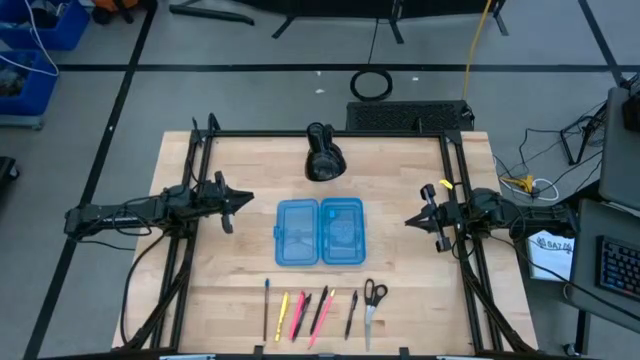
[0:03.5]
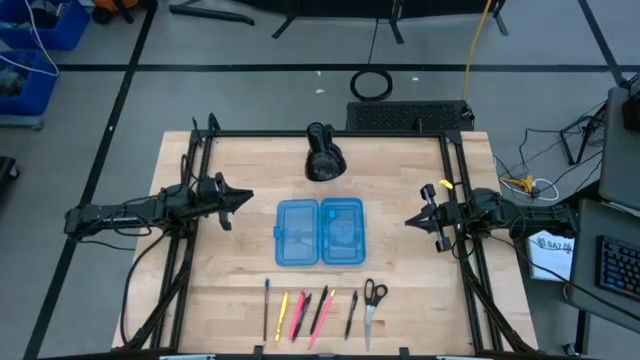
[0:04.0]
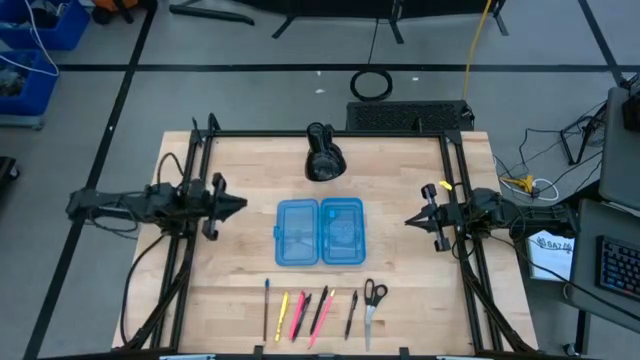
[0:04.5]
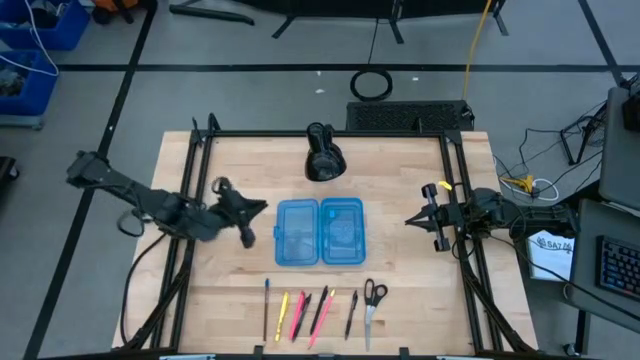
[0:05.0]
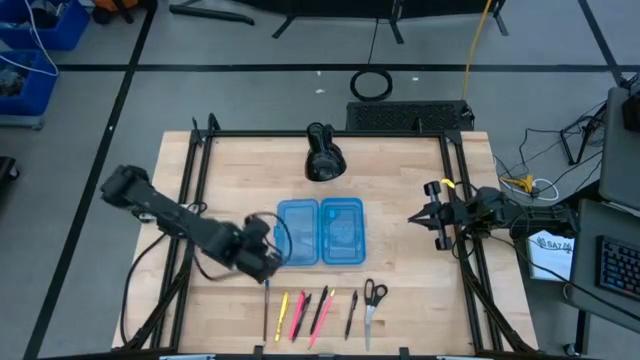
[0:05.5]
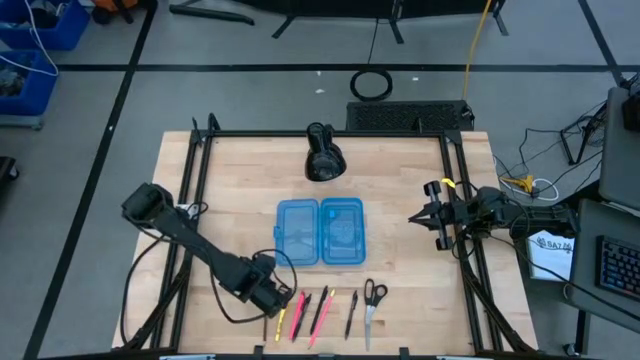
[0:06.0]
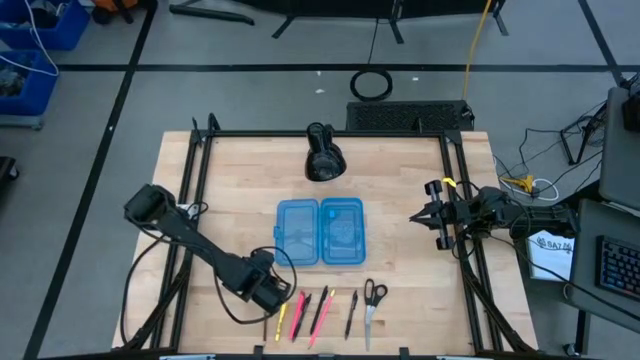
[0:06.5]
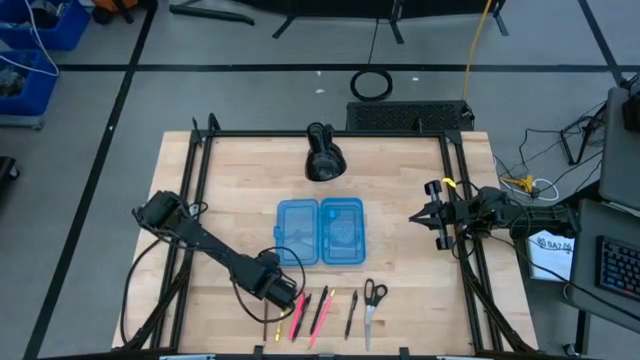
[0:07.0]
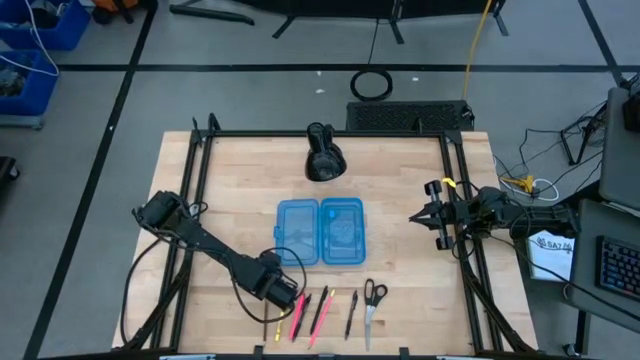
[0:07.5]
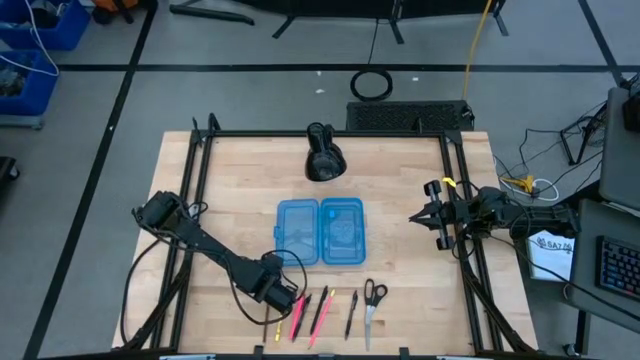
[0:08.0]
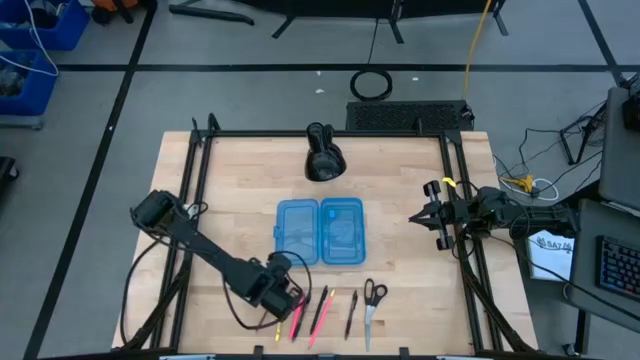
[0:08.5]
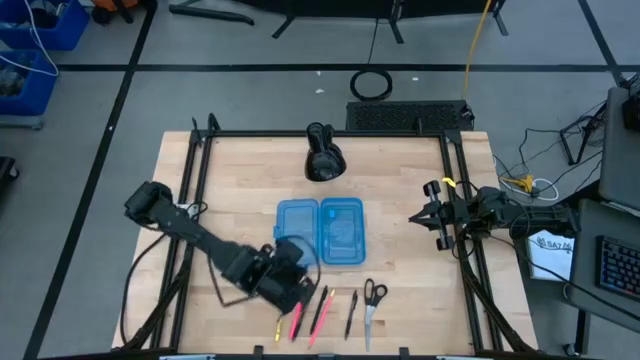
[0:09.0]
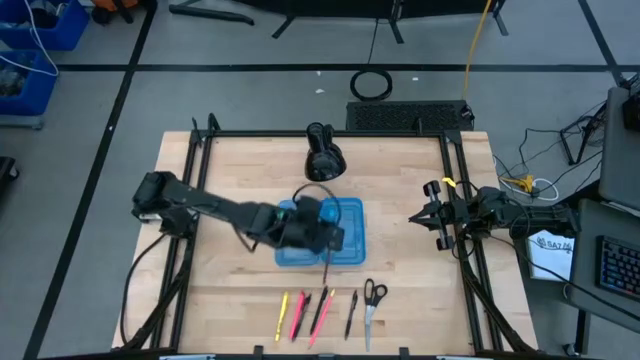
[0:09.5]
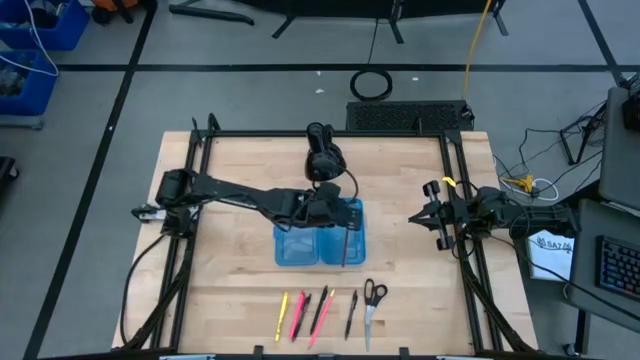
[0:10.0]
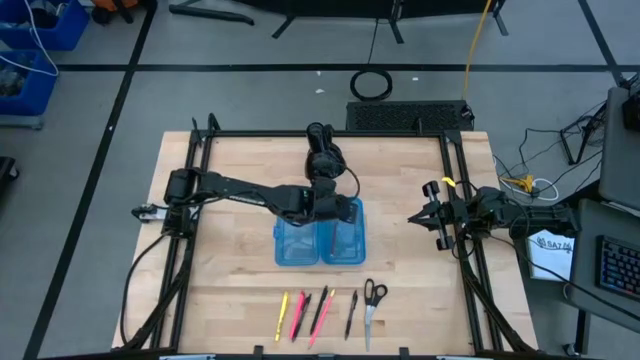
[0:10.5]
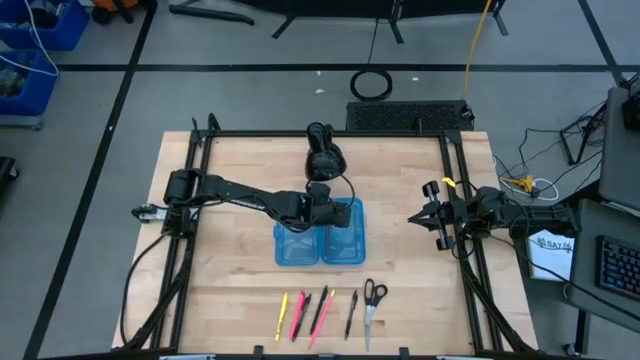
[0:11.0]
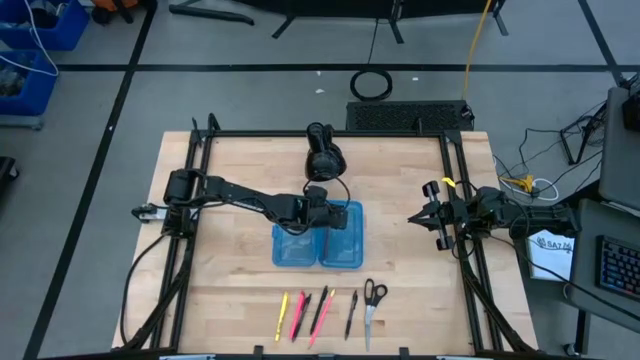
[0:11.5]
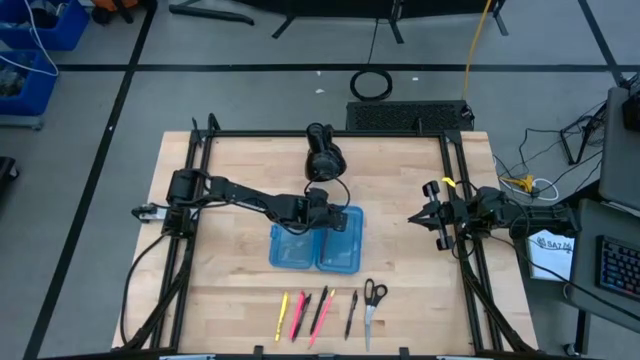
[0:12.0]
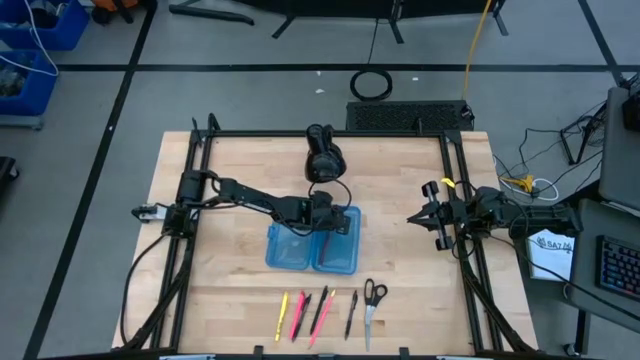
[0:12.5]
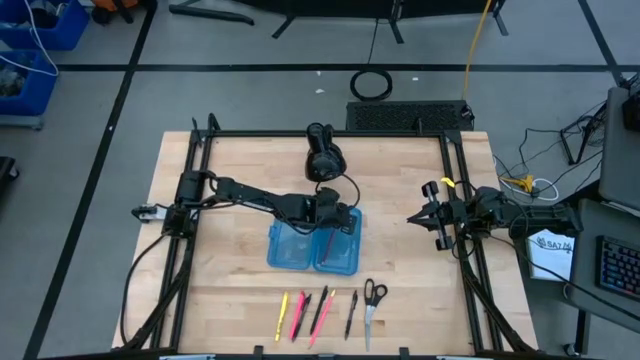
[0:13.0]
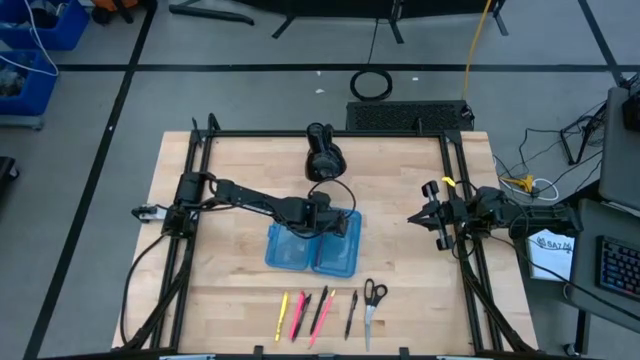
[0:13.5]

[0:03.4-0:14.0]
Task: Pick & place school supplies into a supply box
Put the red pencil into the blue supply box

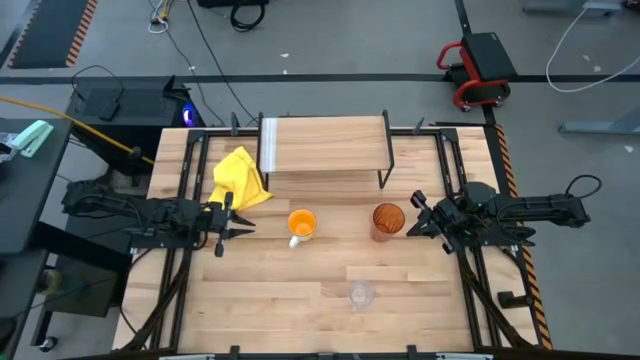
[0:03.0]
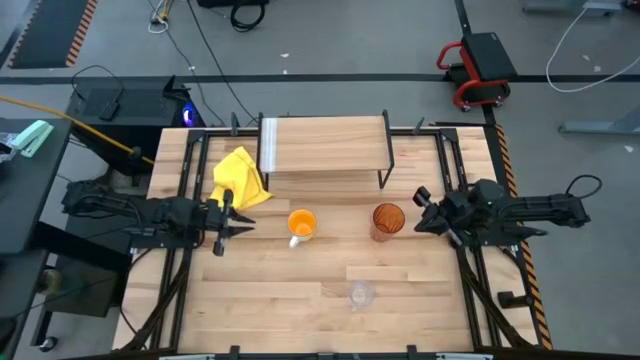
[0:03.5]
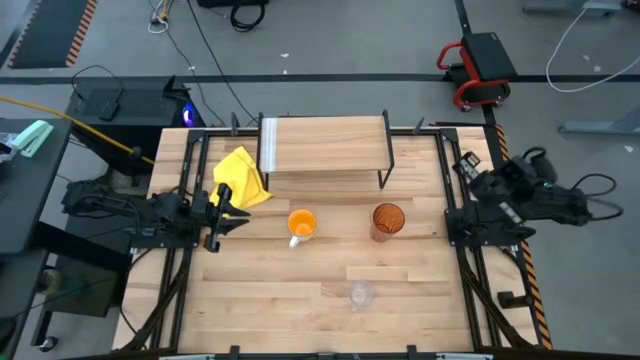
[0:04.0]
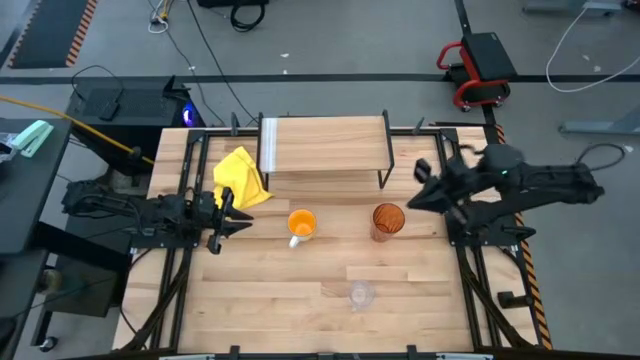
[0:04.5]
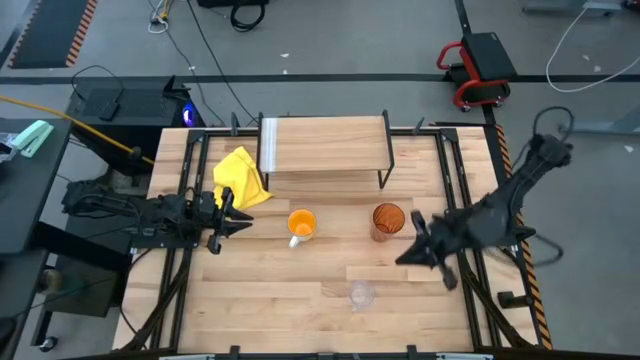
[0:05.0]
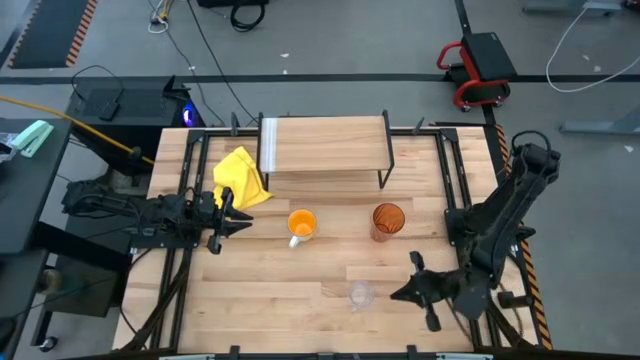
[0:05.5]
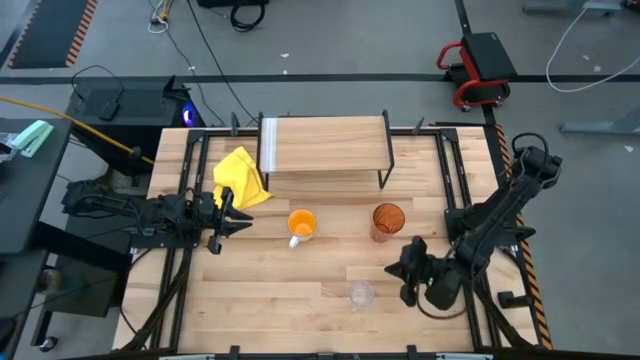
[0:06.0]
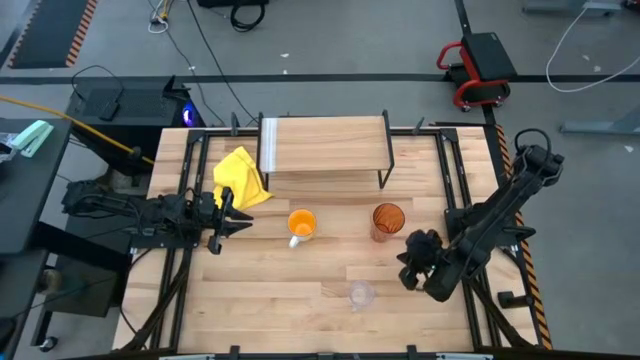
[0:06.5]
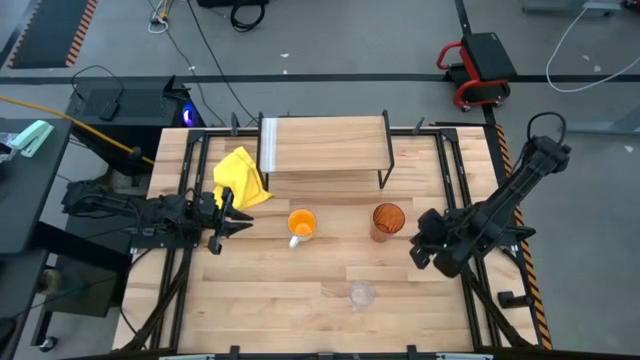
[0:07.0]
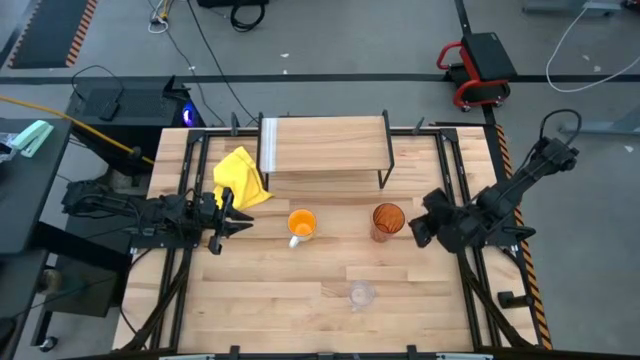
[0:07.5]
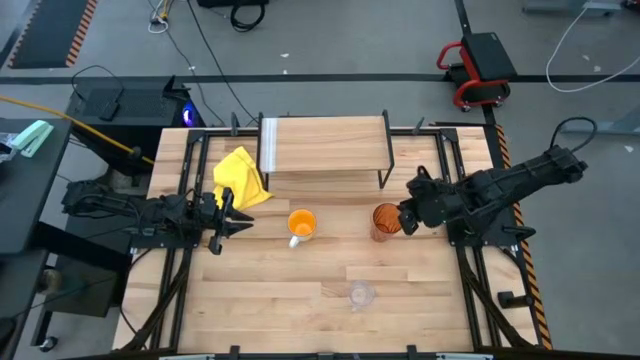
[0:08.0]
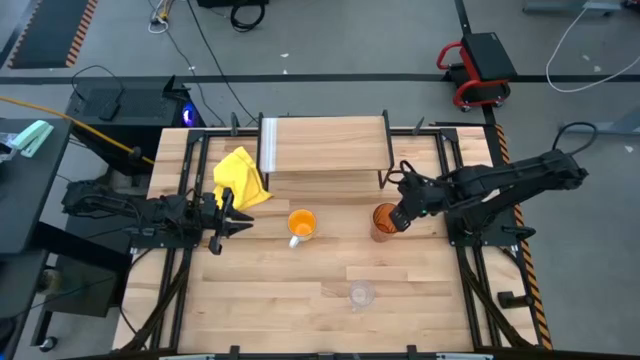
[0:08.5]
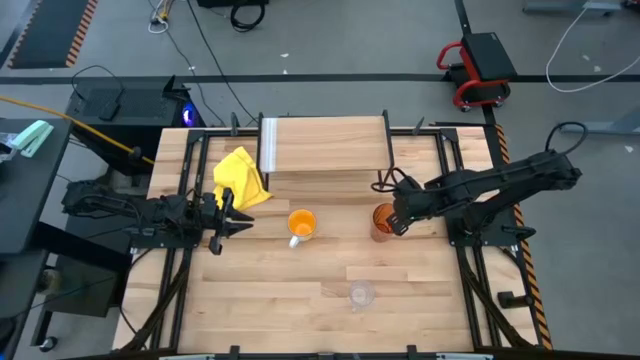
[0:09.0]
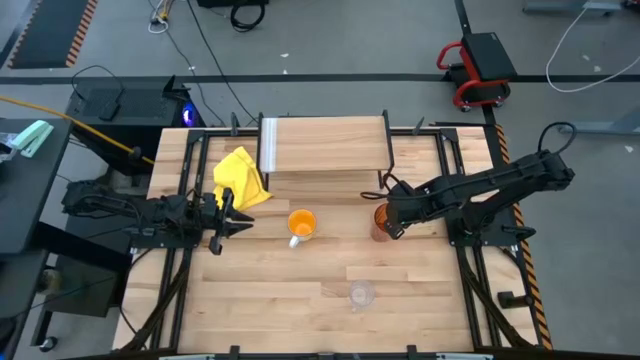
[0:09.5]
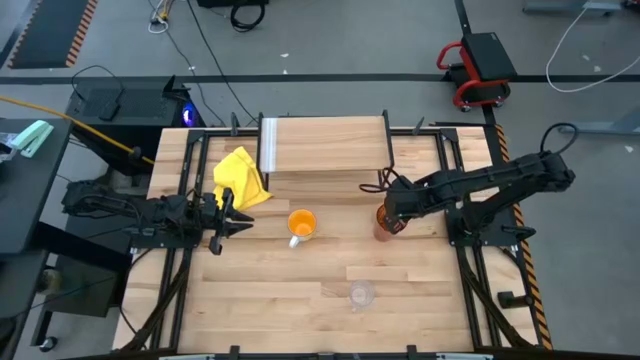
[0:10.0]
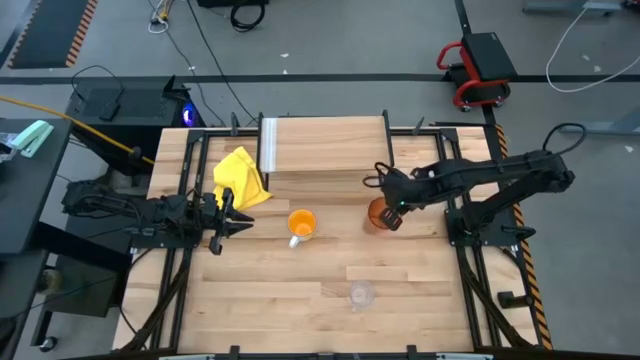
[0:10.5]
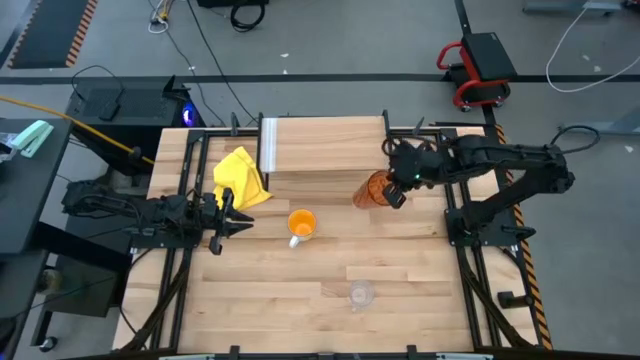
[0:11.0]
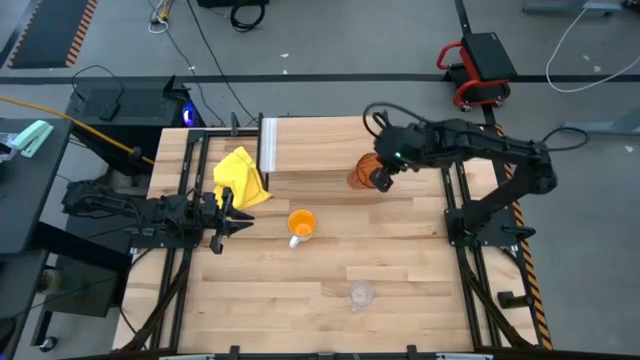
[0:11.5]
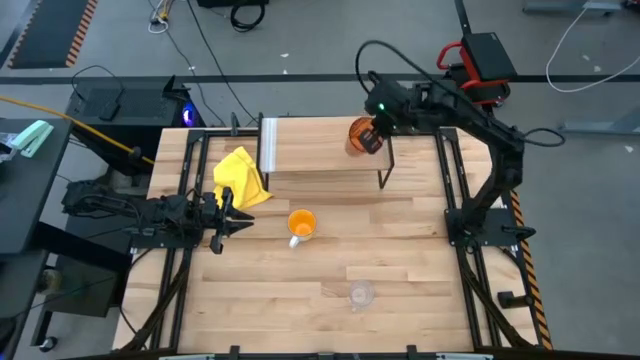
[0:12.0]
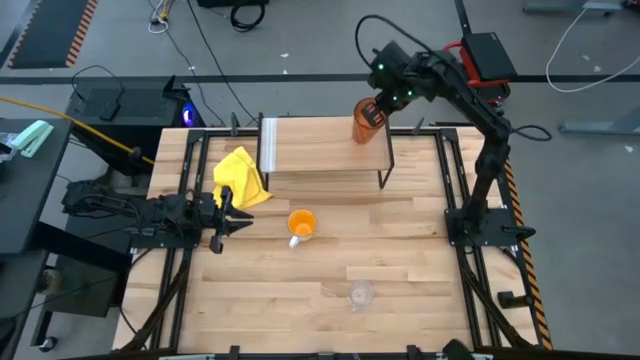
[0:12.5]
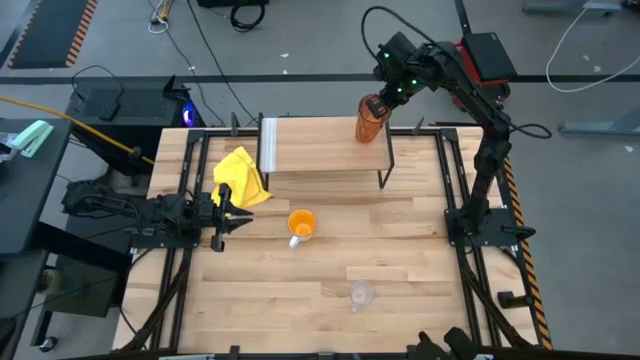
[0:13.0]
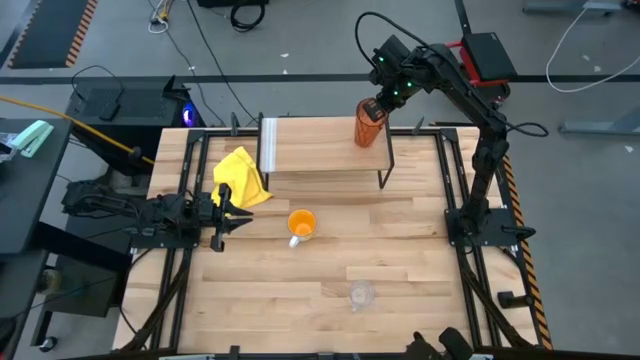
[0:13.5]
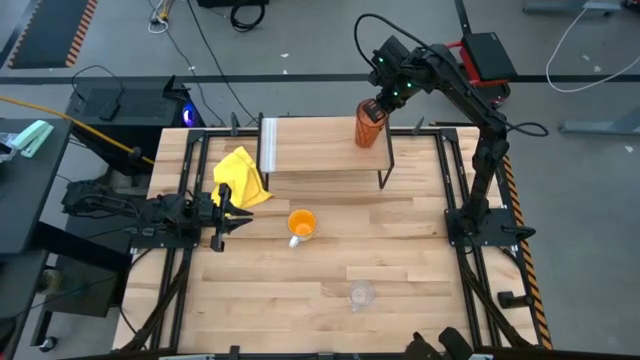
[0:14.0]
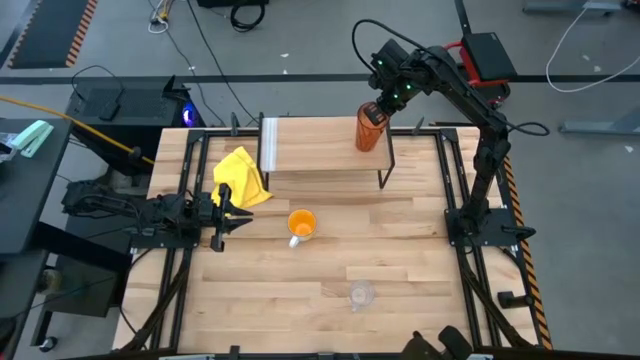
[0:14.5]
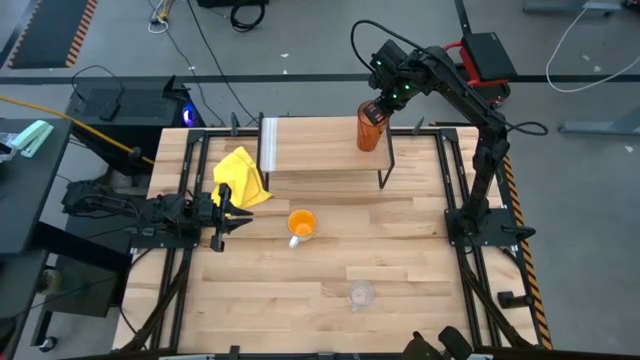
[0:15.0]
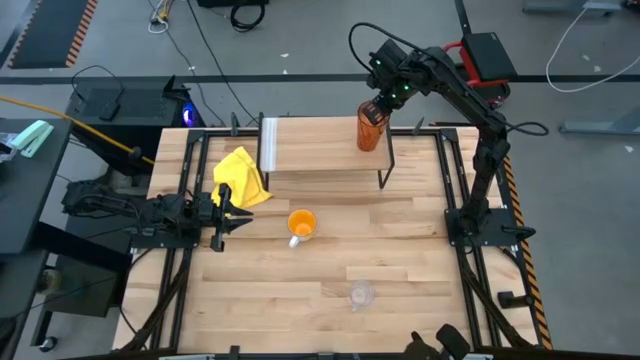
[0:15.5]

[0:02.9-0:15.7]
Task: Stack small to large cups/mugs on shelf
Put the brown cup on the shelf
